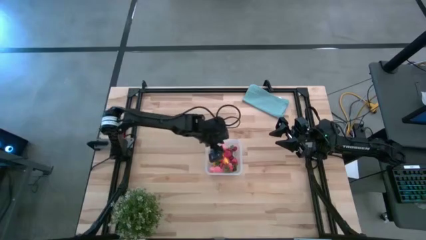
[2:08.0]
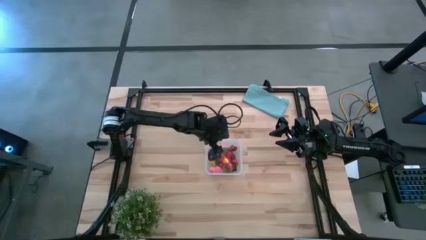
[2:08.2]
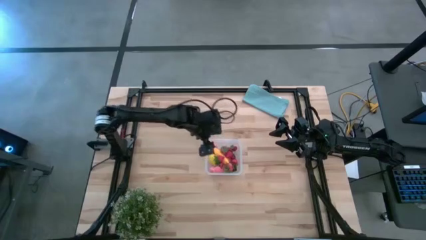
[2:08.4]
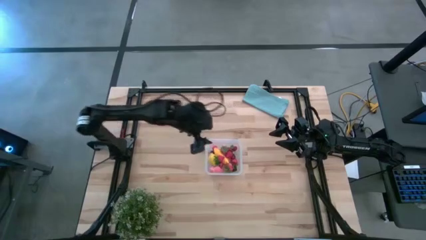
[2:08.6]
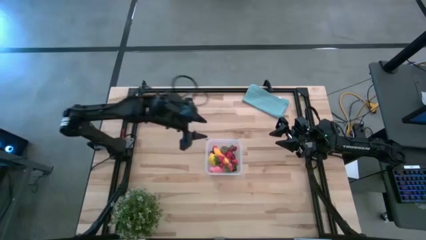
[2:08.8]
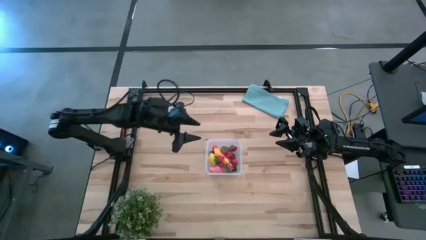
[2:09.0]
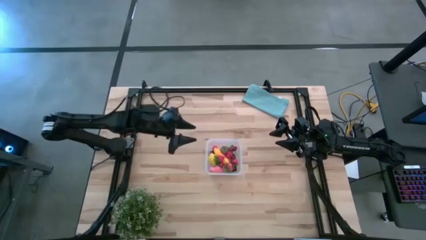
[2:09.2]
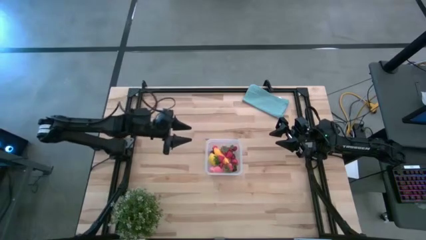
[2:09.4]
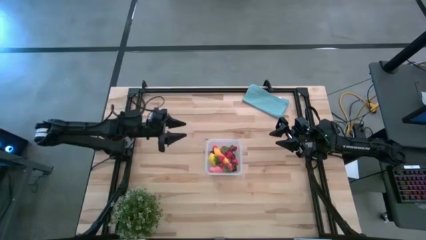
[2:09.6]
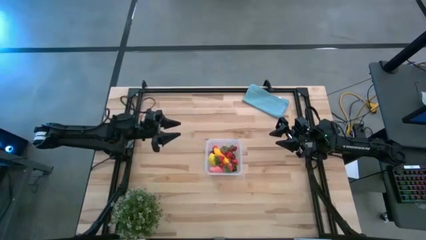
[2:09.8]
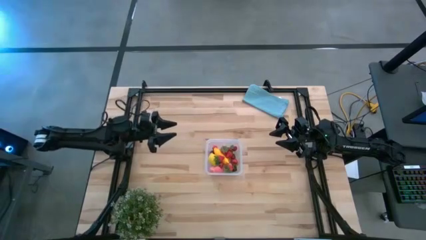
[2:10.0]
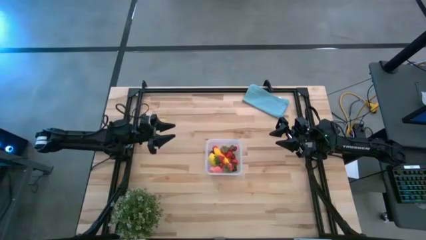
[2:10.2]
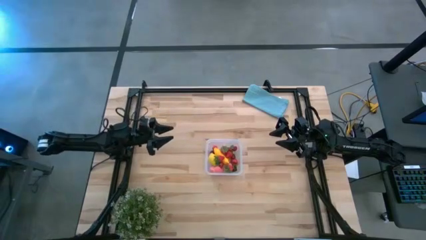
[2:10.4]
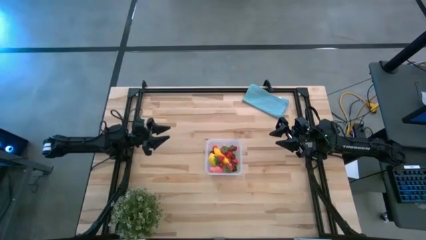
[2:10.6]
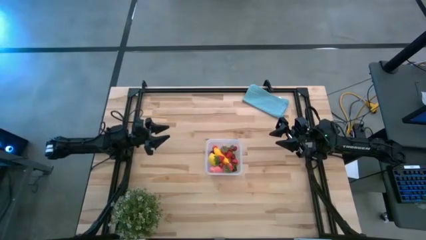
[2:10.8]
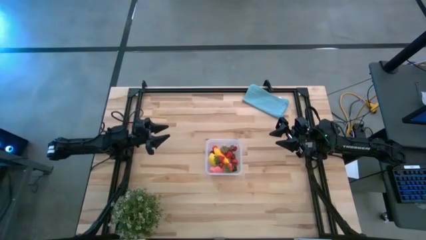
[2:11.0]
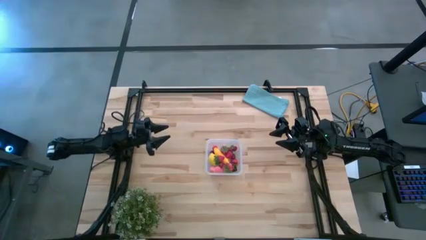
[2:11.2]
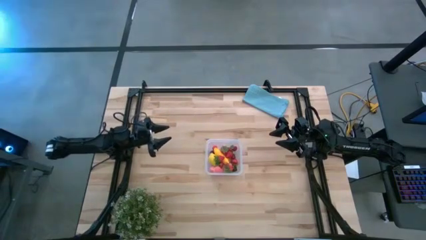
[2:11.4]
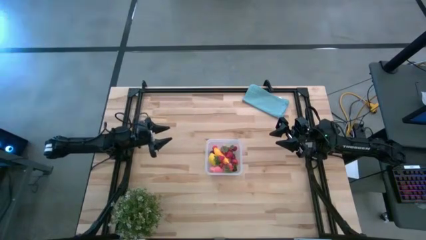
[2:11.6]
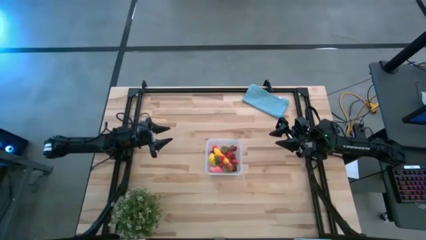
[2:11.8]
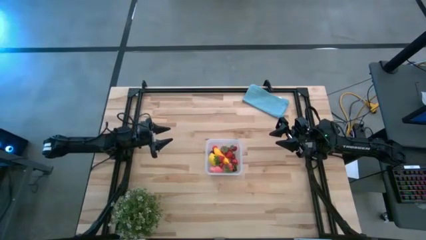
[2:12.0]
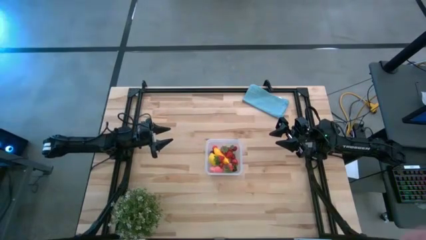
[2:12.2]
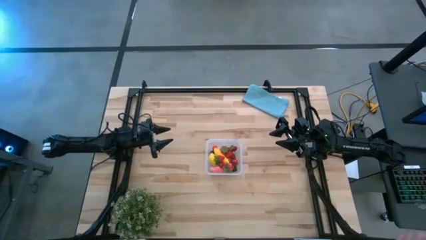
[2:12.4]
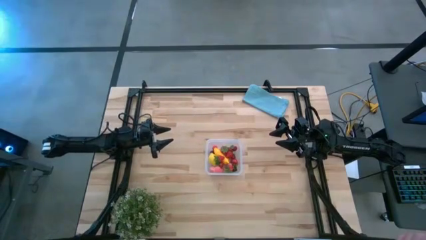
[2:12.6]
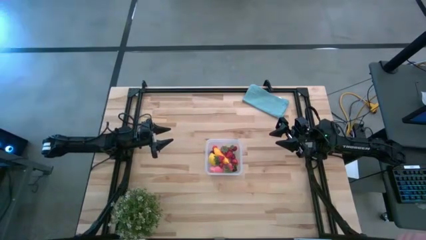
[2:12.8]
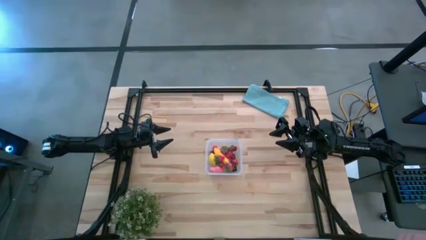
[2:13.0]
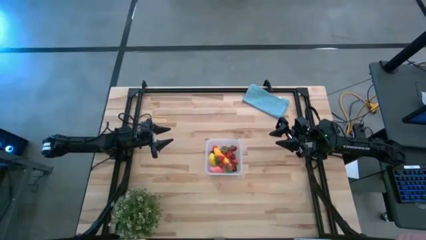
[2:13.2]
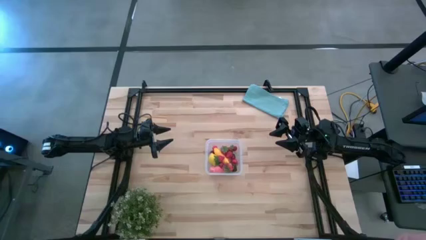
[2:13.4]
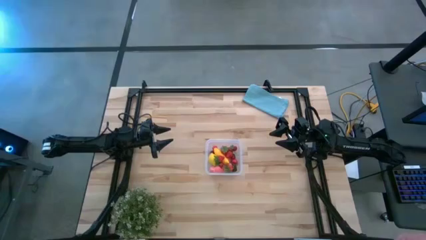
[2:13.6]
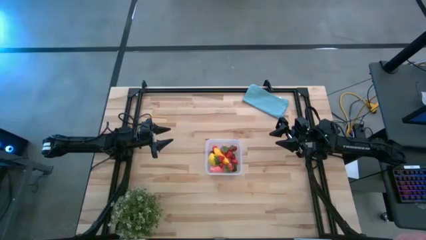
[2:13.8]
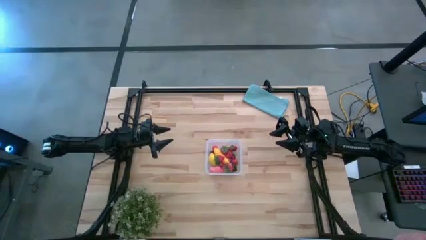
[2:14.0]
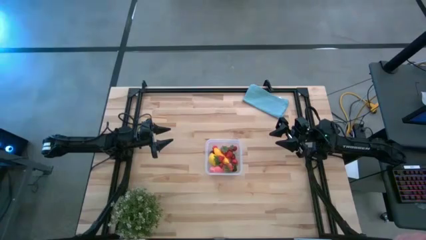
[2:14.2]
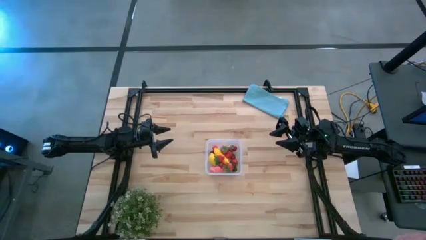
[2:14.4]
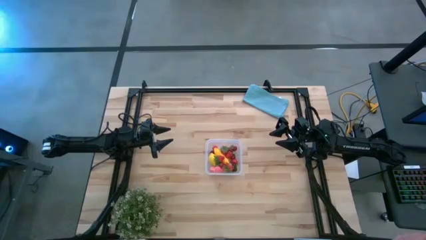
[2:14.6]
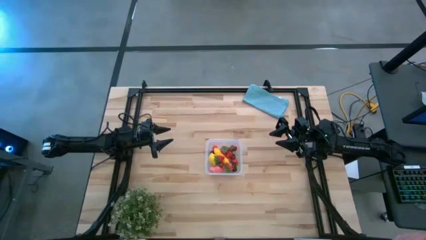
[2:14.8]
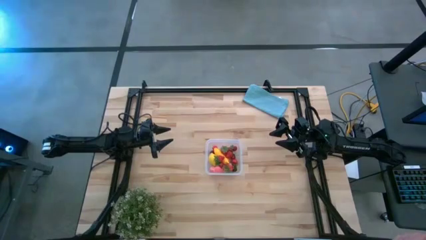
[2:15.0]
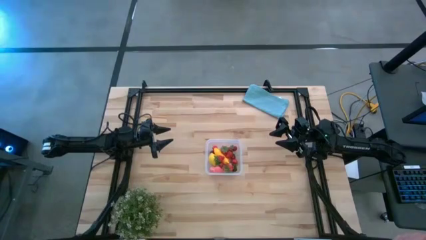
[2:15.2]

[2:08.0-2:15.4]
Task: Pick and placing Produce into tupperware
Return to Home Position

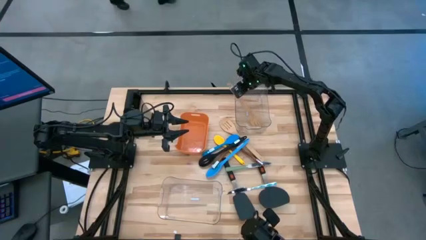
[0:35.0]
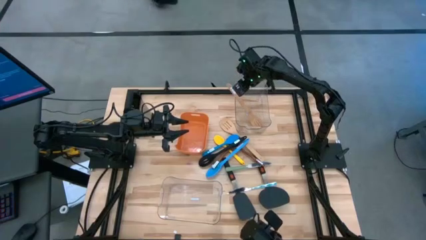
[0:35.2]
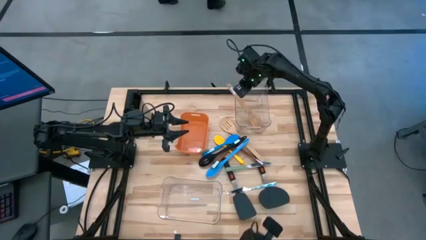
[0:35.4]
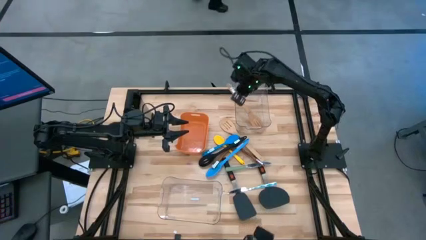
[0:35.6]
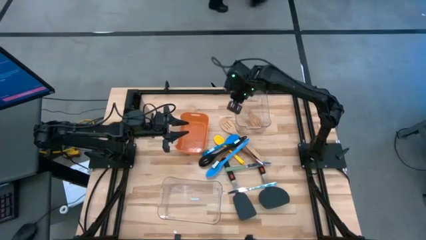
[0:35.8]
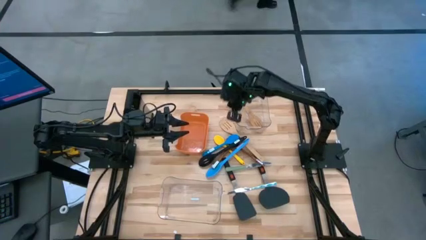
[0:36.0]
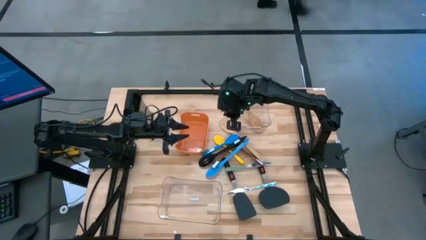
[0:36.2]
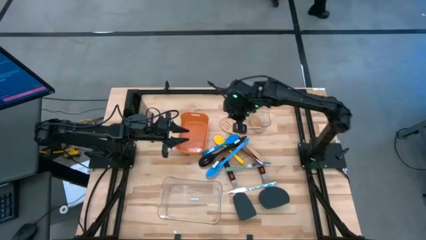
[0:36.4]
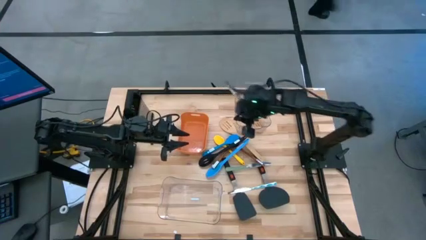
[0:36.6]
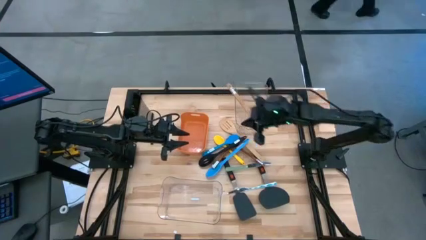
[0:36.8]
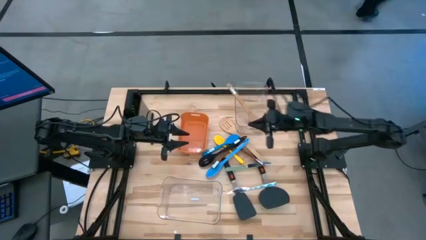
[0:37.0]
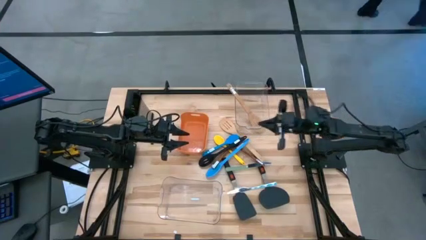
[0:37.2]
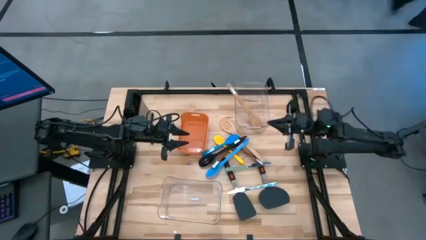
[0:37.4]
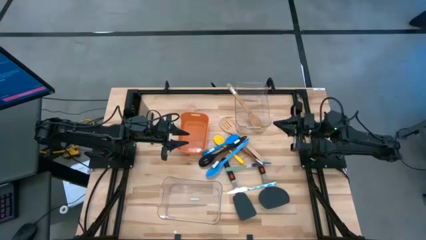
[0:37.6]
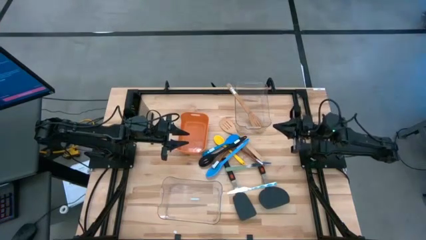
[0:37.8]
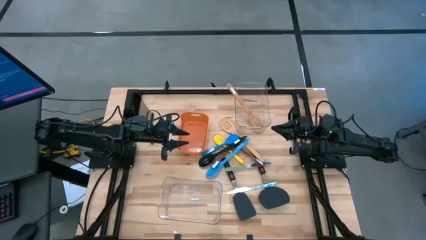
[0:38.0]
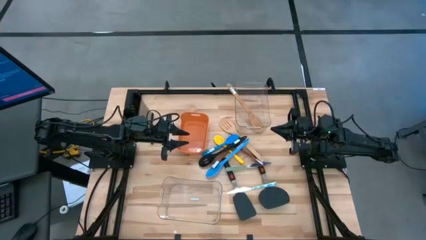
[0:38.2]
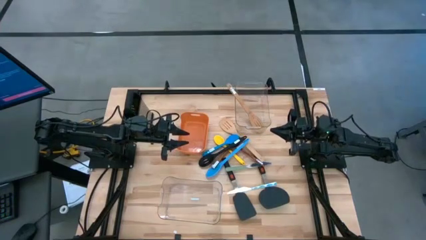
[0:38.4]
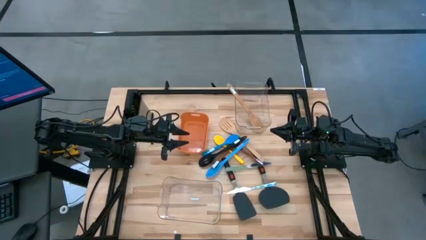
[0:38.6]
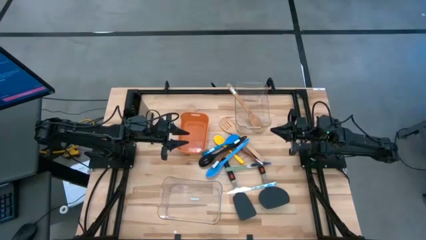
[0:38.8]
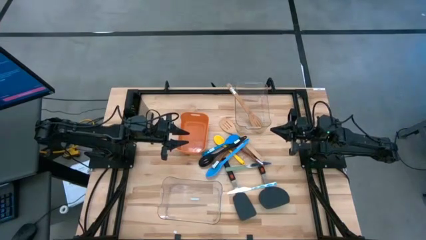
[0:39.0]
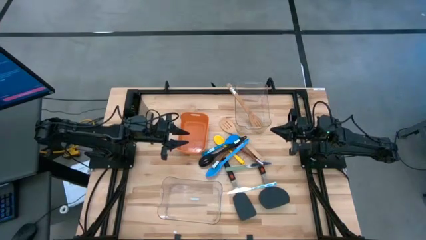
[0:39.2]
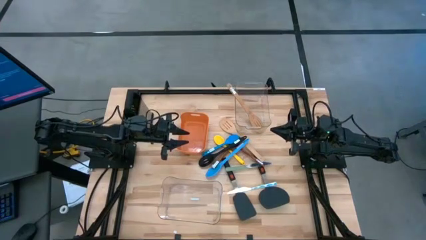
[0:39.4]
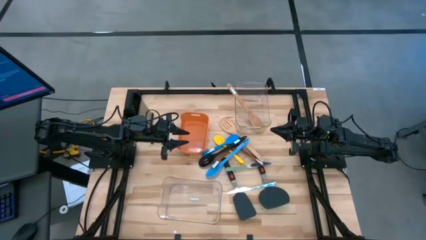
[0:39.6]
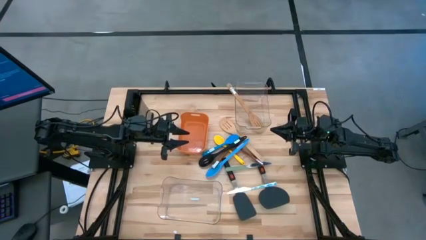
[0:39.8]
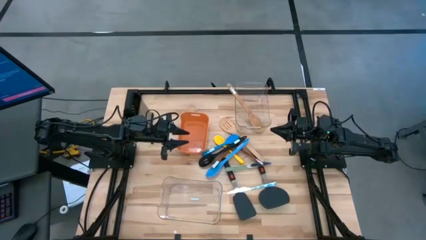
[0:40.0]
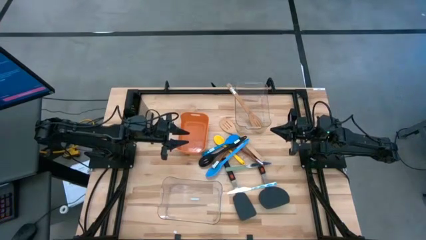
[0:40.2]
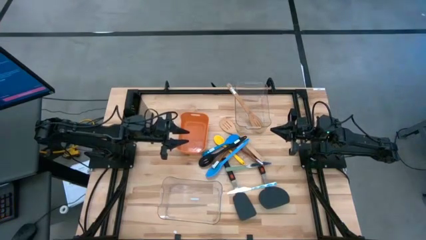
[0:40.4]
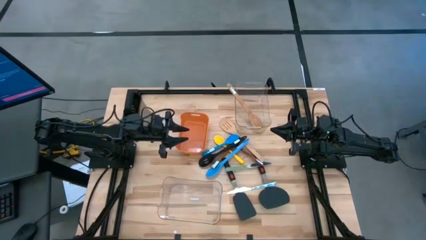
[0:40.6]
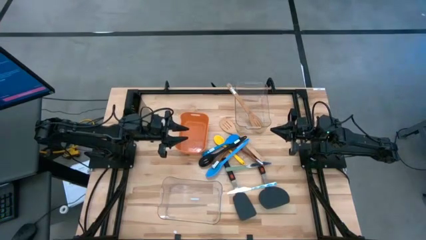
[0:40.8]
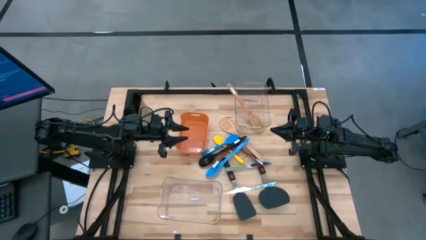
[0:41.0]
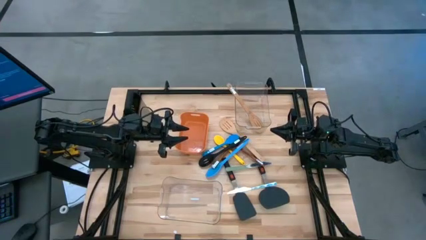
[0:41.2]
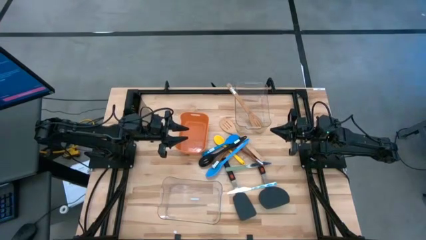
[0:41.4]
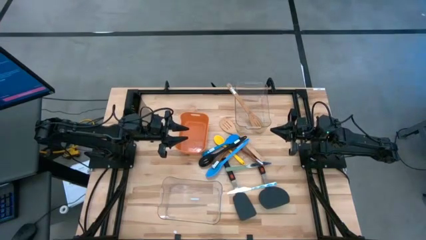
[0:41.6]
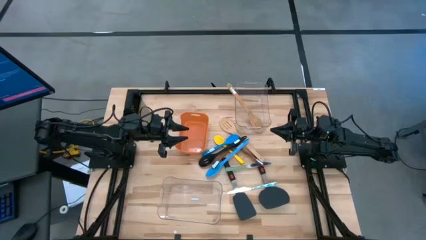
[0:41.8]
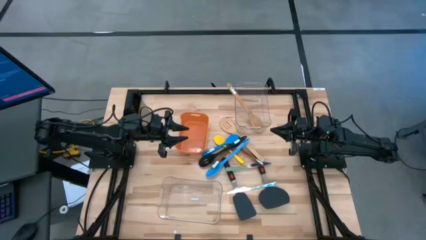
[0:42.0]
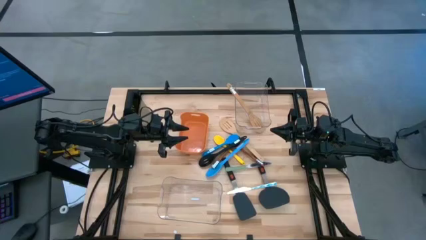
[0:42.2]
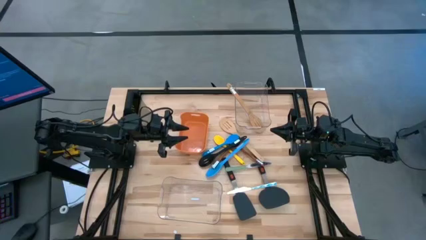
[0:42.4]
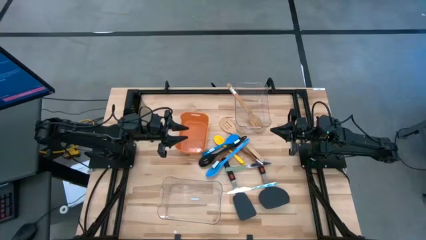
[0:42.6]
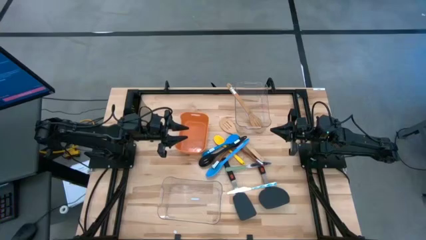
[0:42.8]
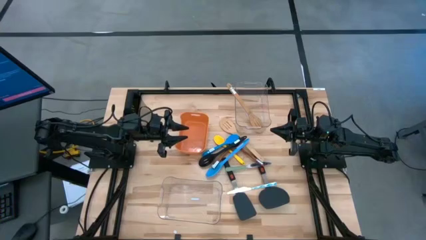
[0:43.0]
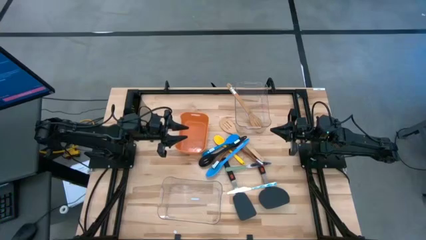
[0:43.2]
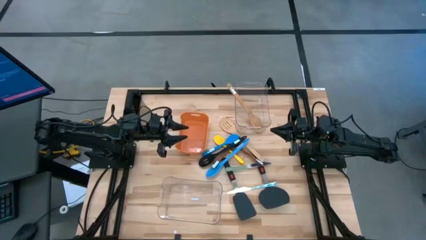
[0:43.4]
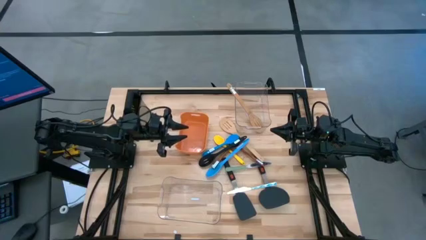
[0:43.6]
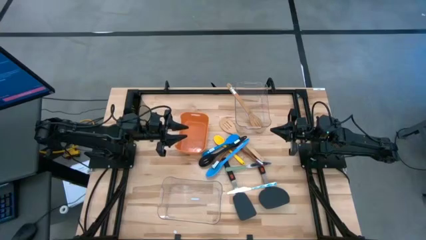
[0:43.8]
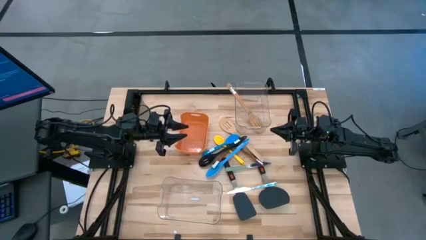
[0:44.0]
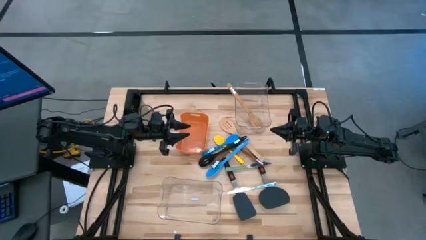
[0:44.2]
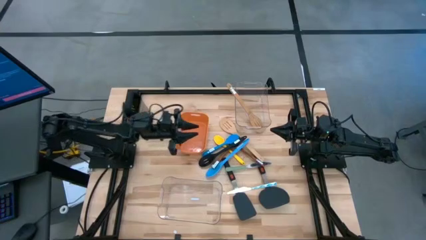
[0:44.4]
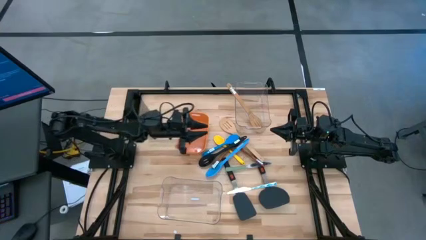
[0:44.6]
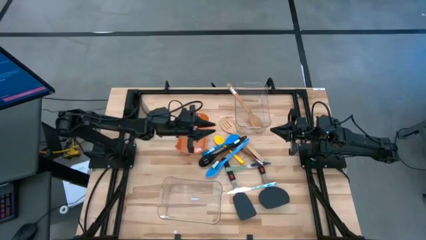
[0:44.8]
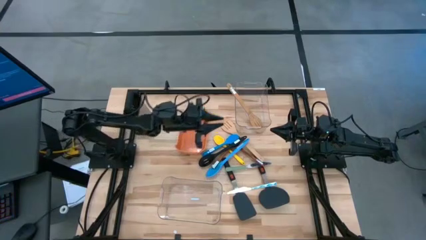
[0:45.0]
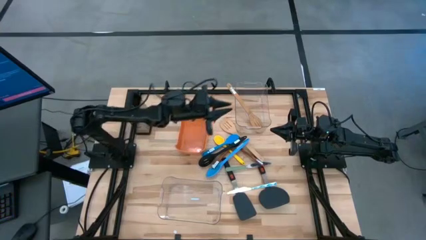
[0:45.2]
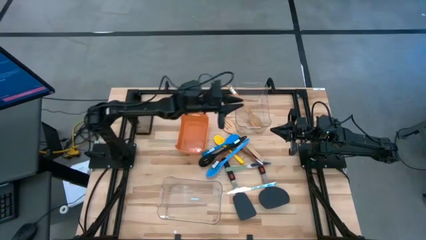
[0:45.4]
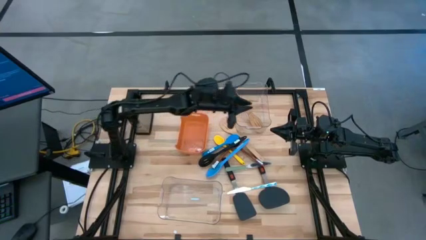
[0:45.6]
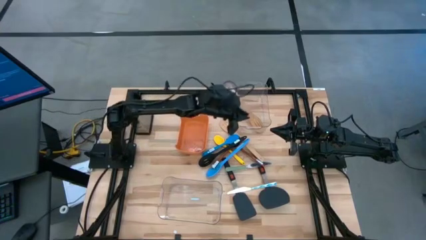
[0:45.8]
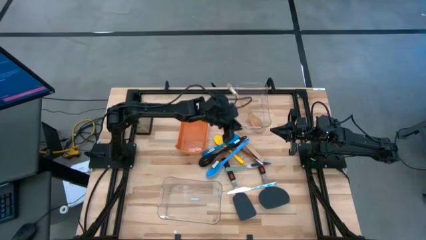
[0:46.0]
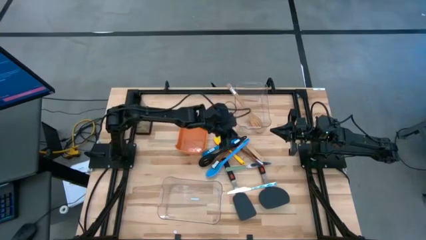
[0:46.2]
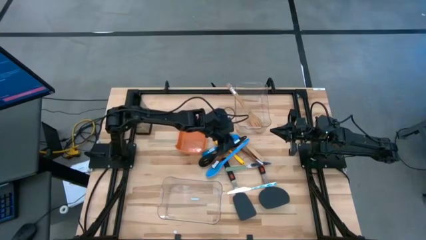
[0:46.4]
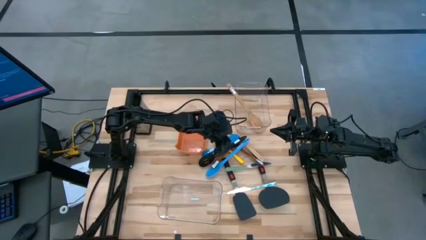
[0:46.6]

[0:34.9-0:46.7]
Task: Pick & Place Kitchen Items
Put the black spatula into the top transparent bin
